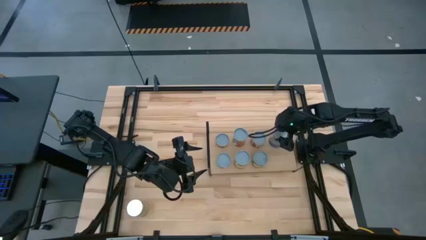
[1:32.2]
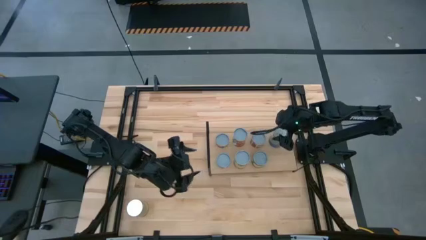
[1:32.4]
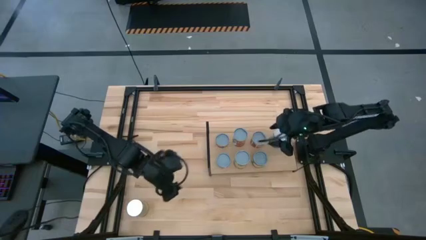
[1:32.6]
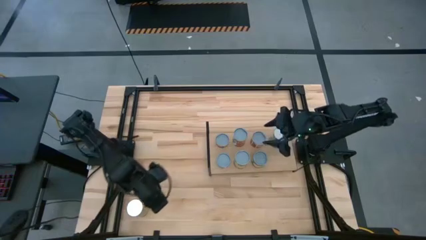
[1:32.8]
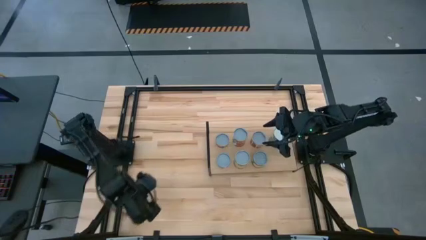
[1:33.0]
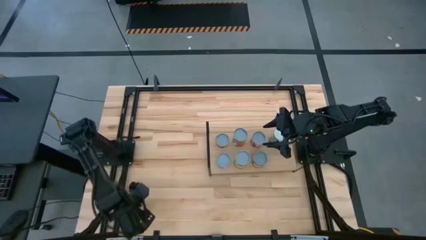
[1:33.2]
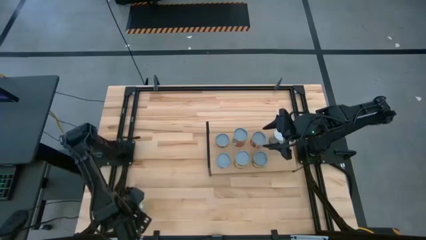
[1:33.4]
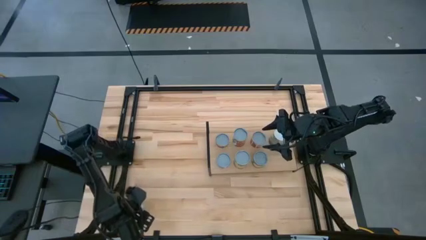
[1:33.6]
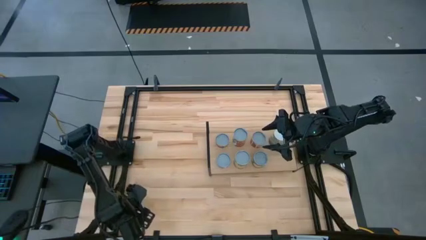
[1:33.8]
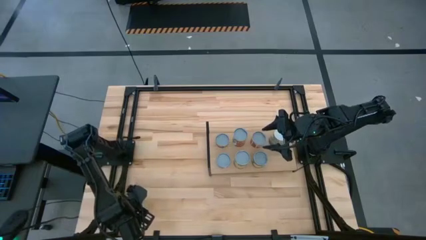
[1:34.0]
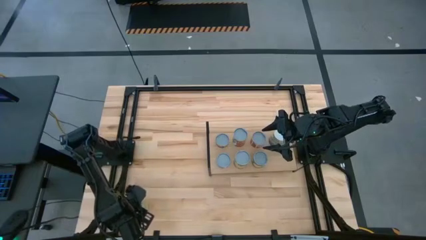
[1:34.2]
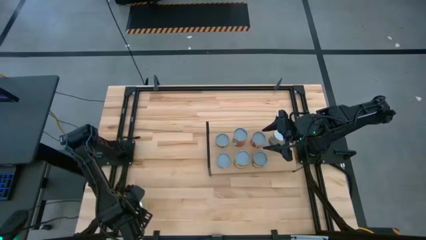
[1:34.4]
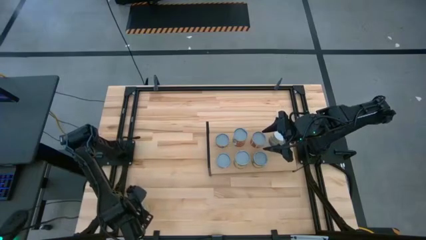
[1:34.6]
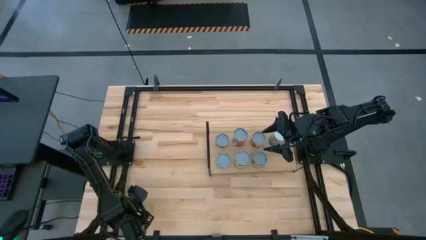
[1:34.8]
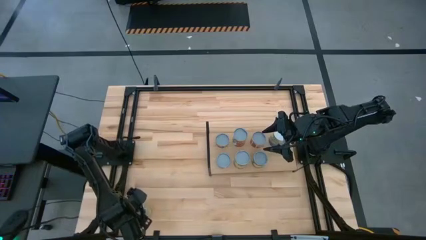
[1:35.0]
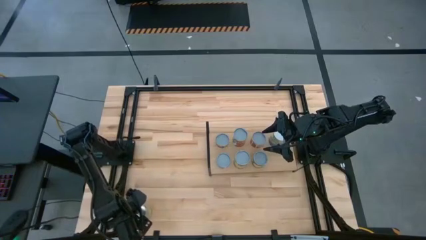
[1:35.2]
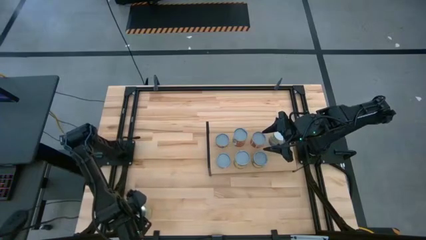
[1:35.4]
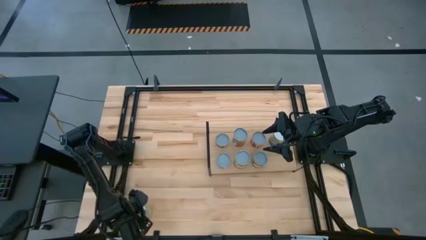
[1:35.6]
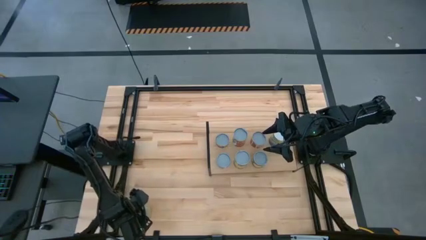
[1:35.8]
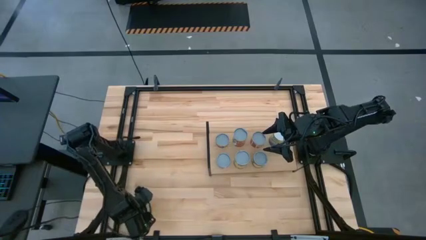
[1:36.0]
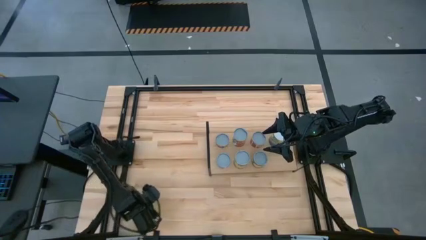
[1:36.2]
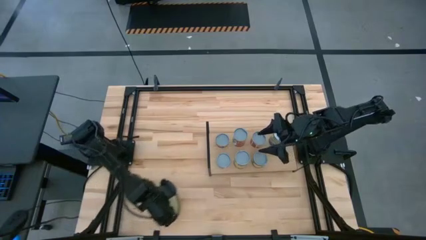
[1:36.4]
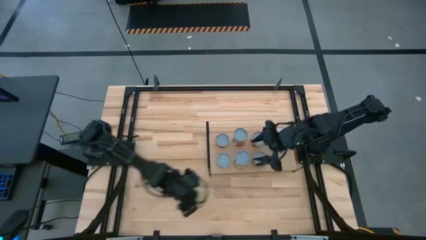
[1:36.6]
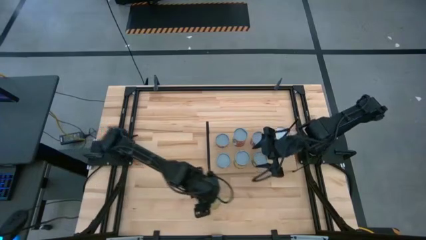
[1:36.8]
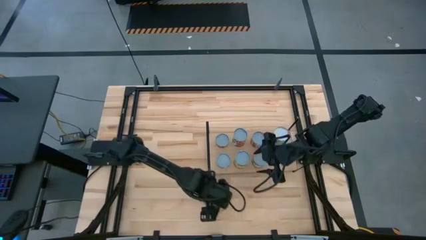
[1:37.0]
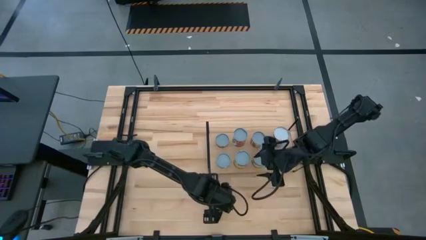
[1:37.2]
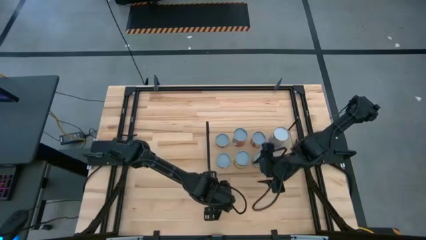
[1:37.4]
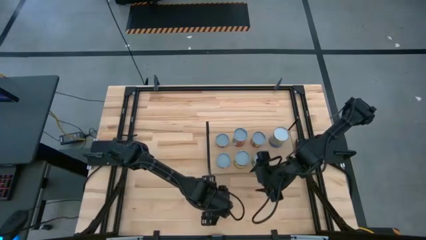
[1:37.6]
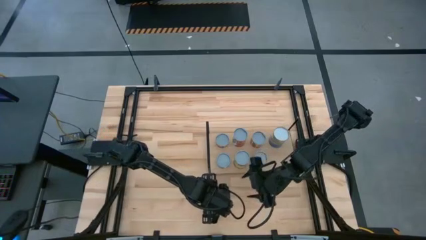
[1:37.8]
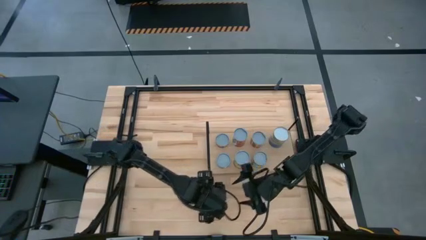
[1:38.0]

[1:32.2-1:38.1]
Task: Pick and place cans onto a shelf
Move the light yellow can to the center of the table

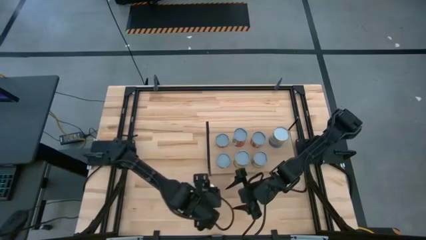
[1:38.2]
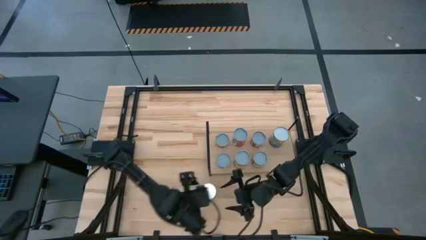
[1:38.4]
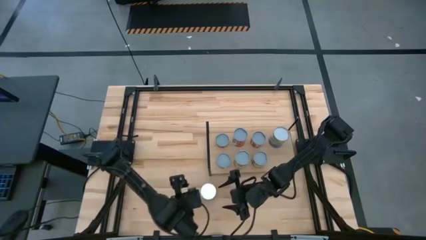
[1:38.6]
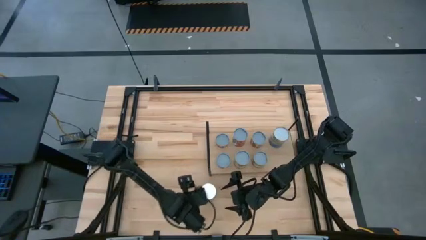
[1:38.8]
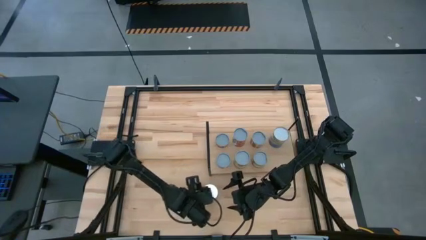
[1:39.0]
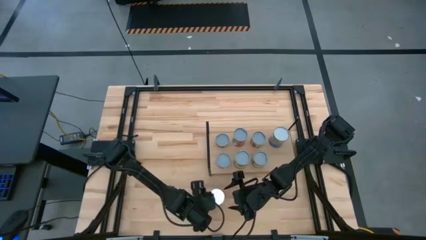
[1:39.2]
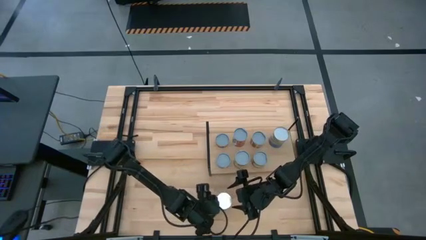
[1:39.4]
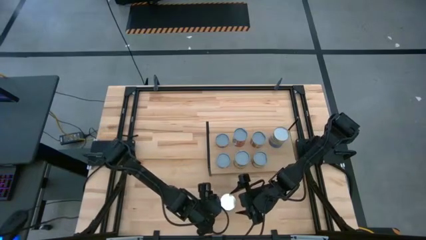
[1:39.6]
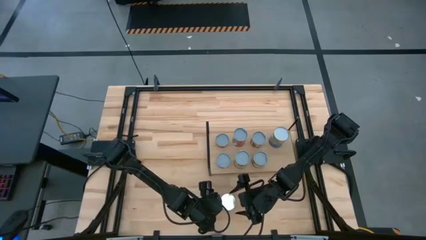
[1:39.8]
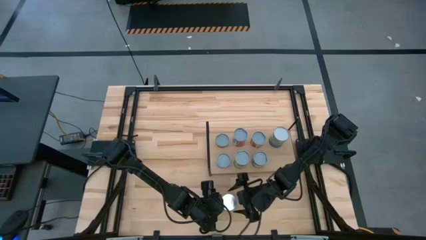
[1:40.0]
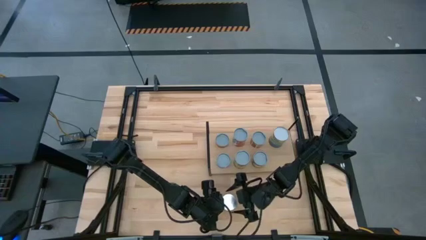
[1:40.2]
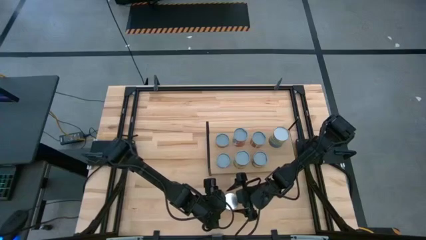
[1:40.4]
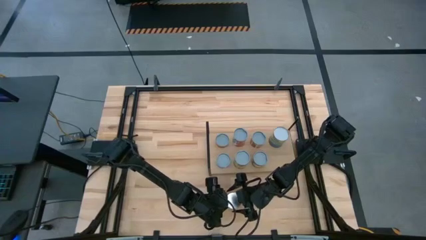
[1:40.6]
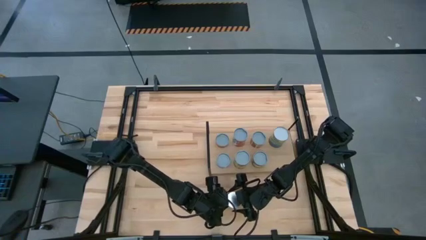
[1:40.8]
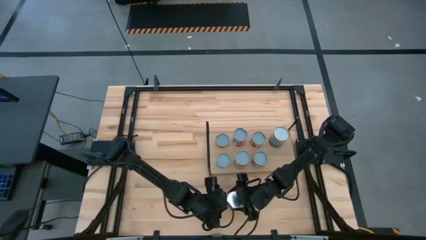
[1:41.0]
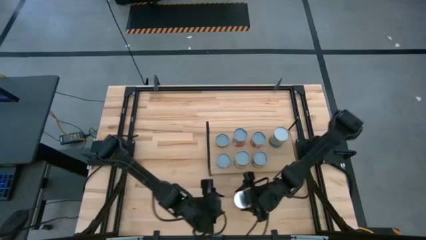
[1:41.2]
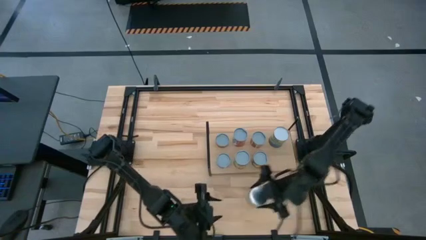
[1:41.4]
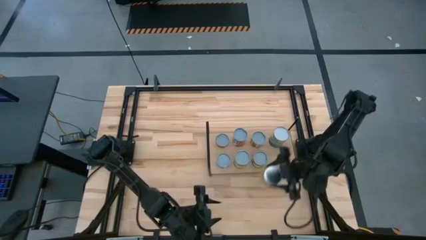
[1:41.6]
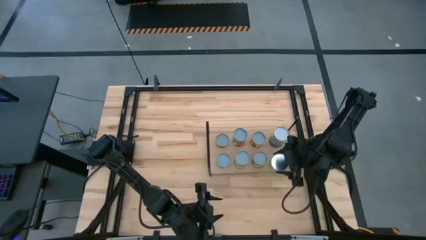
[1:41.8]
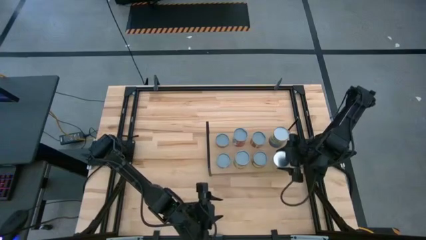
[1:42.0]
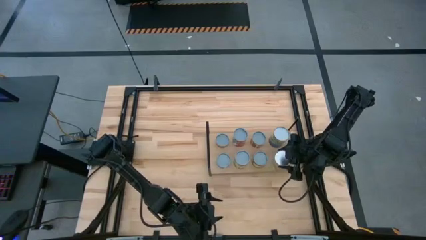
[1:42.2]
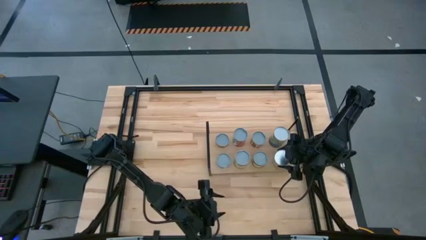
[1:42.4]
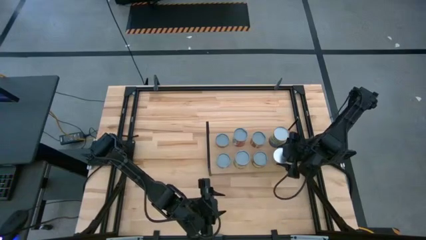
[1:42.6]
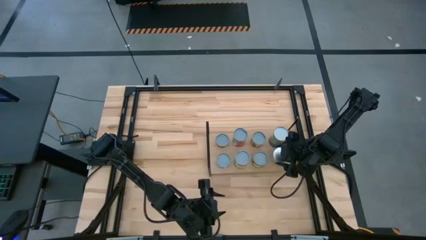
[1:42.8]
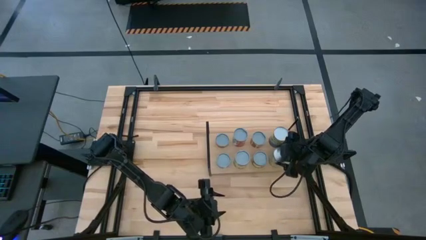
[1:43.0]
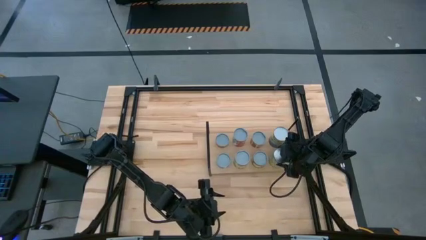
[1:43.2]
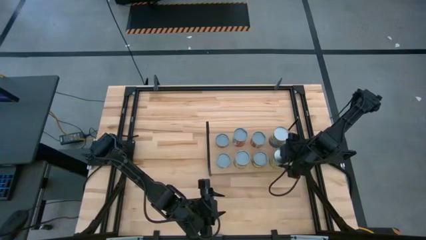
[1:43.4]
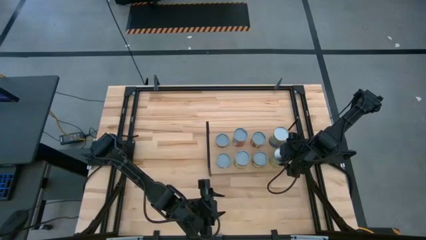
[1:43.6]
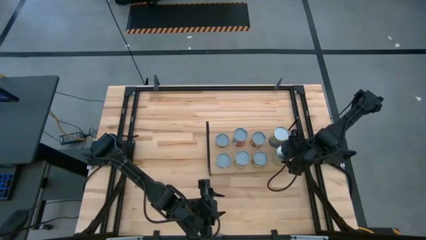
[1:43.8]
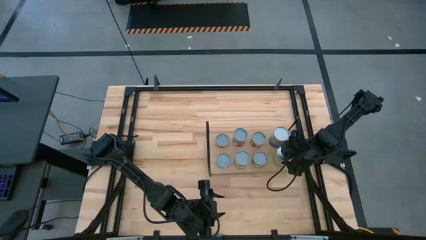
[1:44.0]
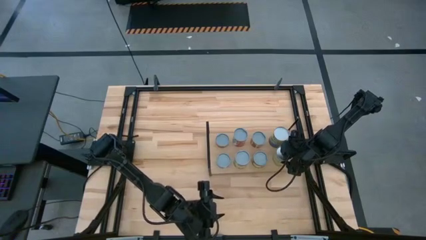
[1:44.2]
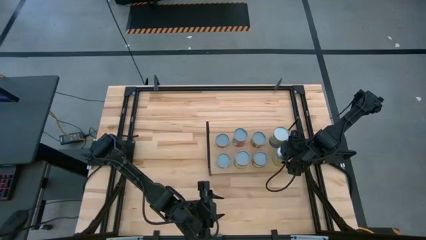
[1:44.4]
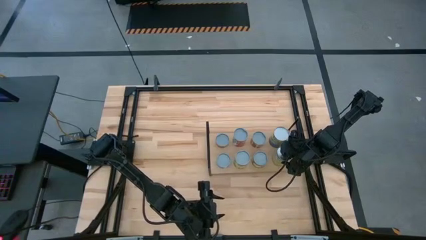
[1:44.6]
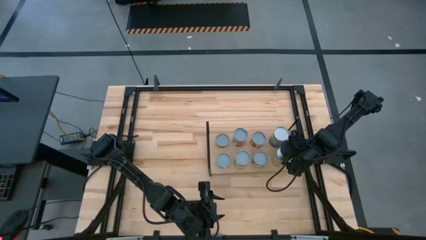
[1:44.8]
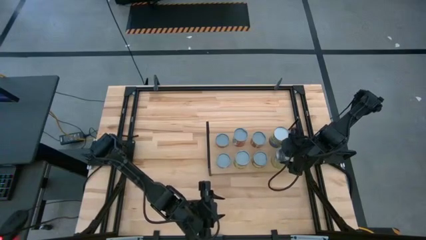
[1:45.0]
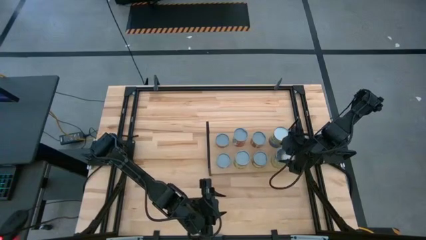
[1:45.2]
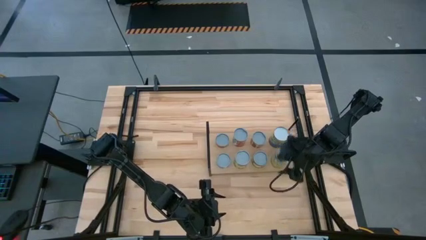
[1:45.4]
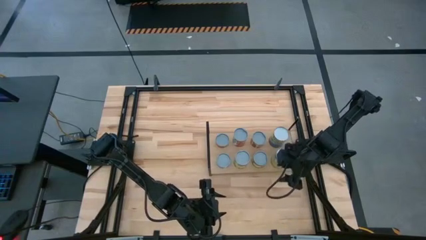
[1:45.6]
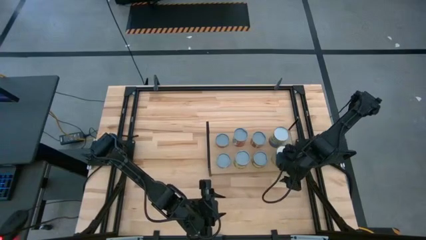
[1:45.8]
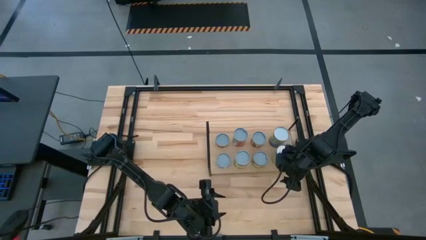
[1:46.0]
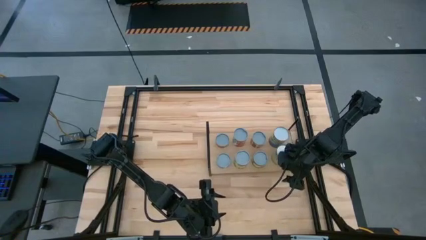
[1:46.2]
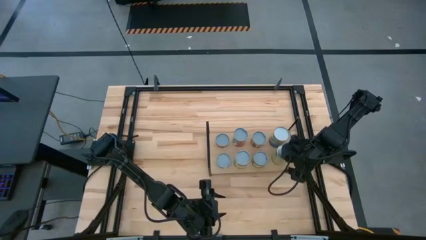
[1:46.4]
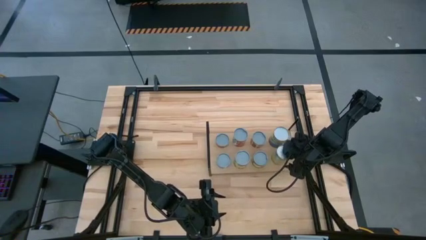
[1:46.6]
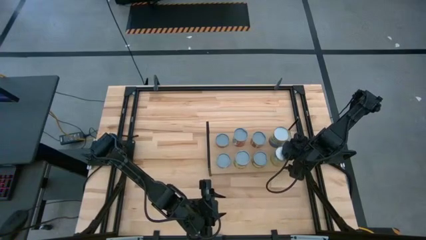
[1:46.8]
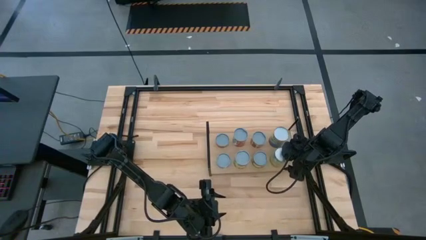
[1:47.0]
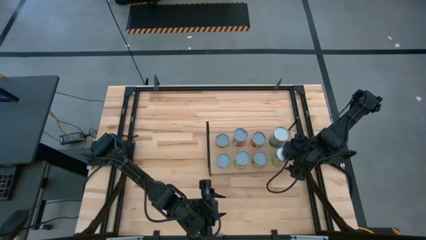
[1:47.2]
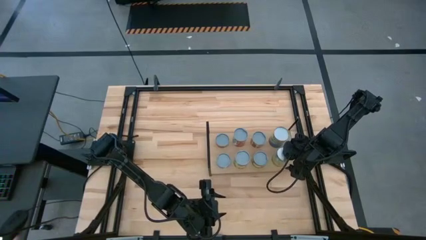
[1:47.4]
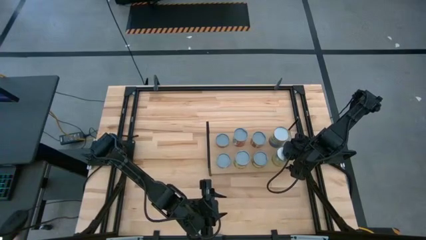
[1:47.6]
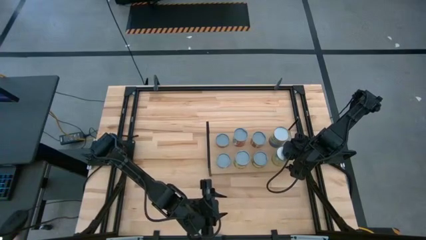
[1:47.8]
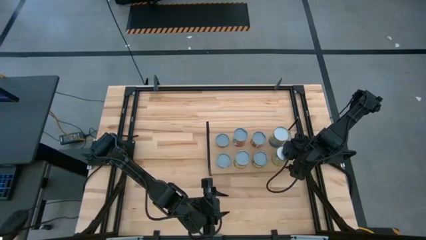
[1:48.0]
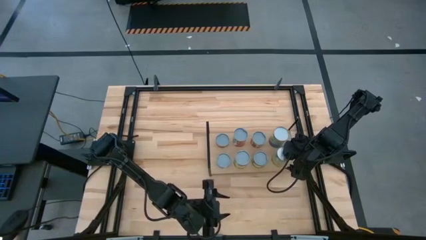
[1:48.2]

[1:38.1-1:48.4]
Put the light yellow on the shelf aligned with the blue can
